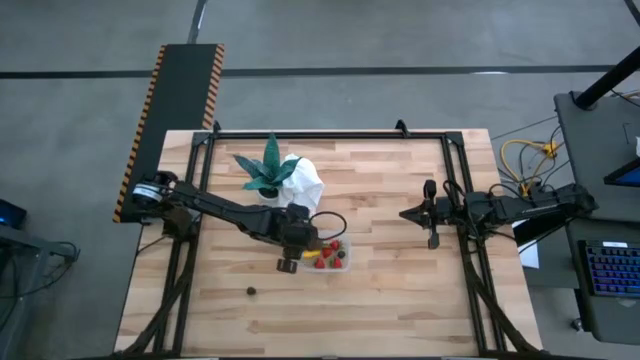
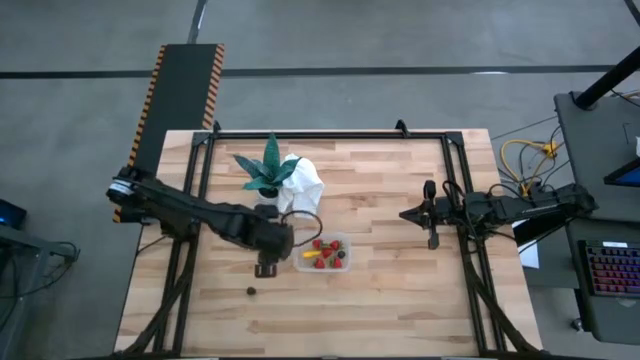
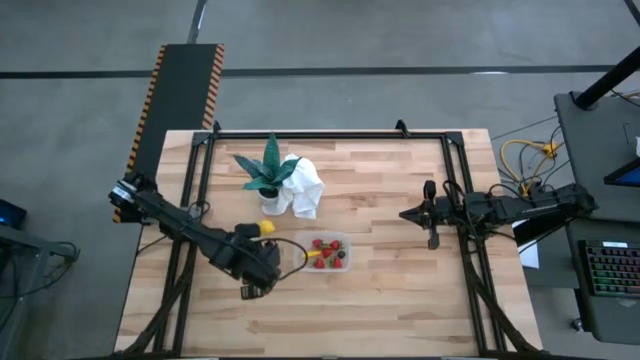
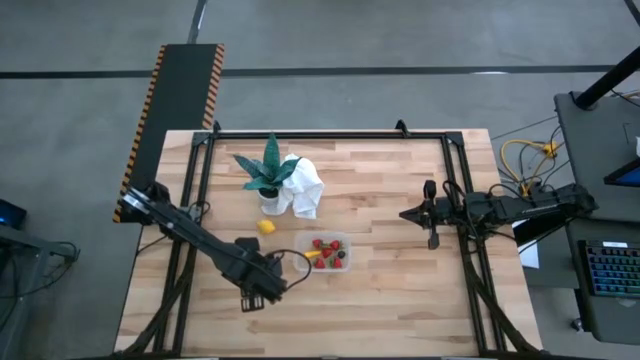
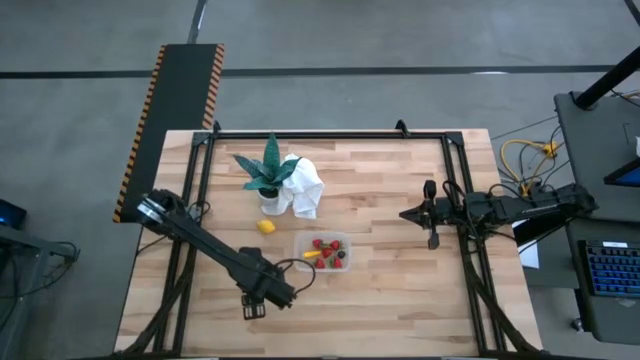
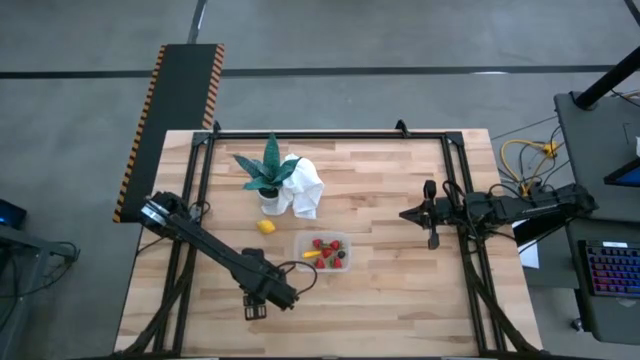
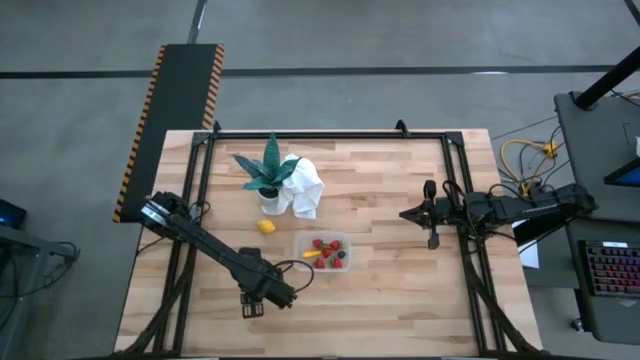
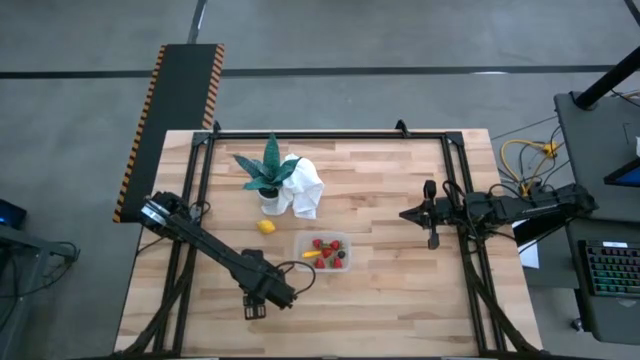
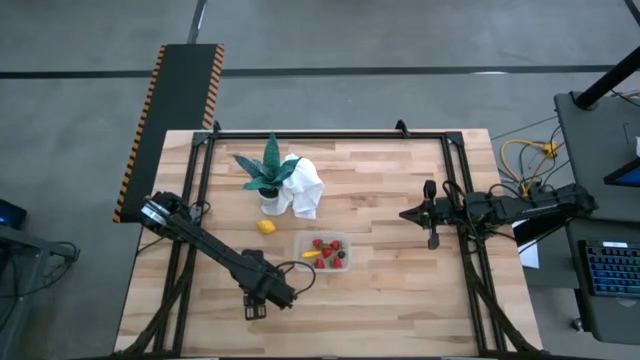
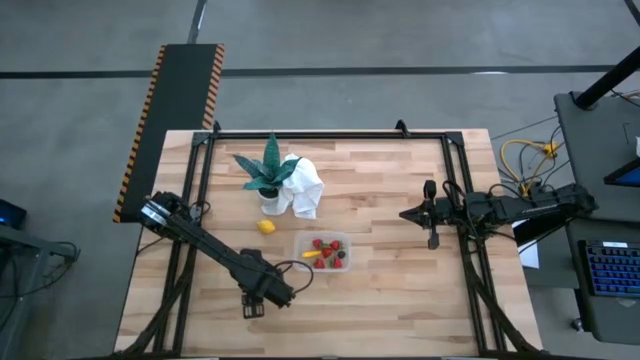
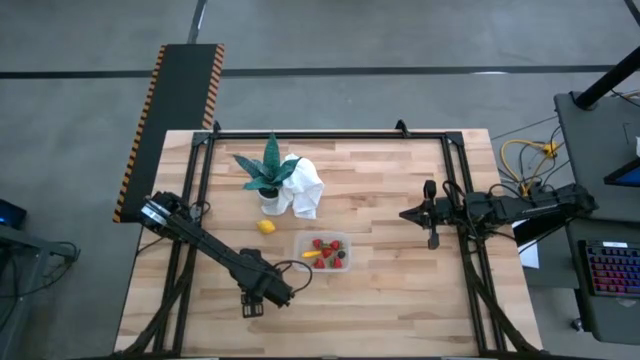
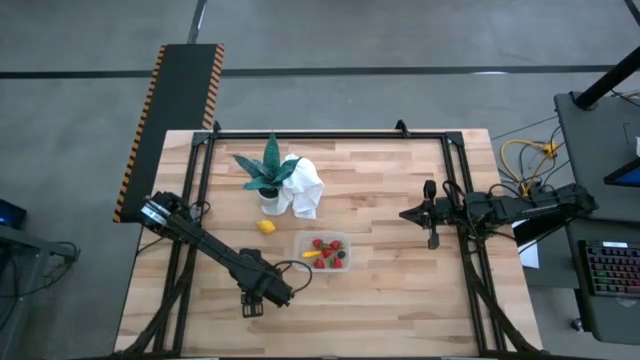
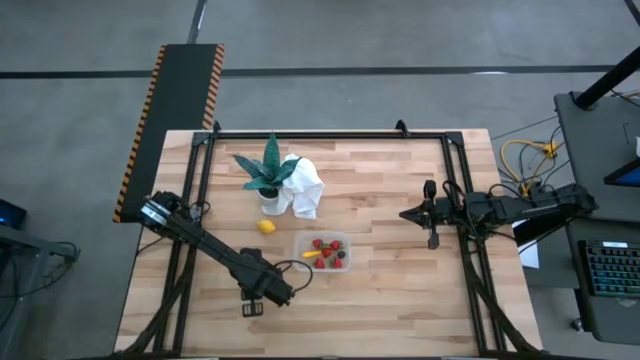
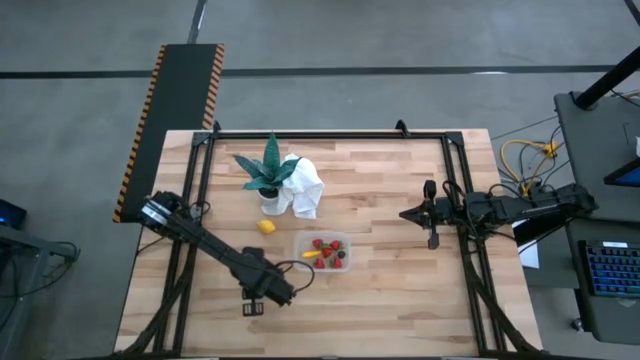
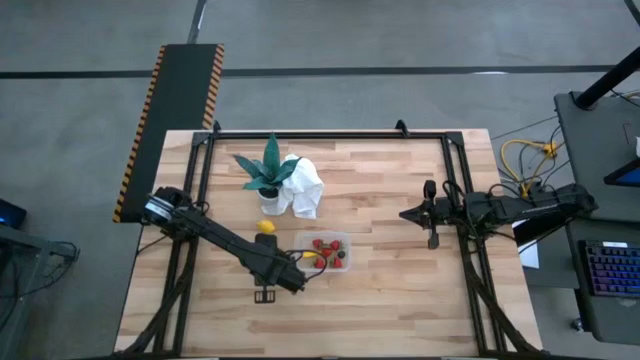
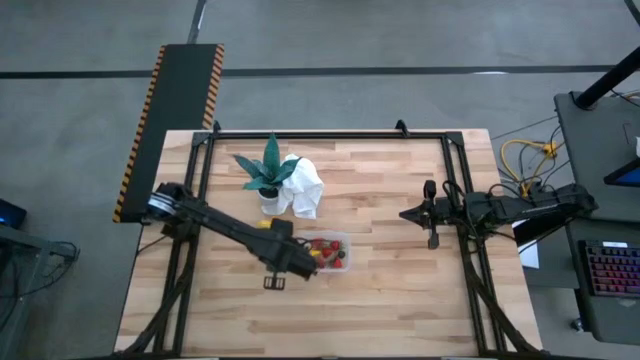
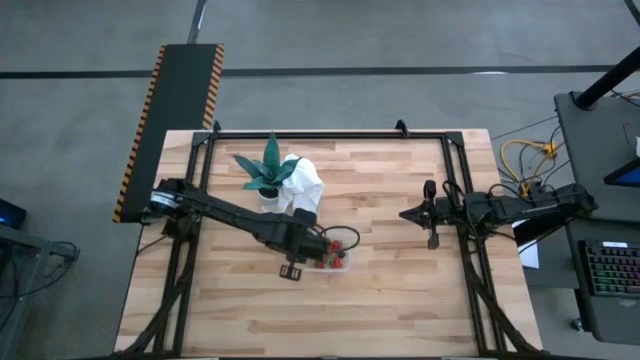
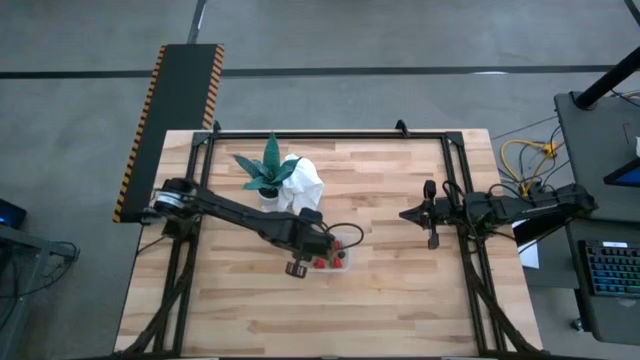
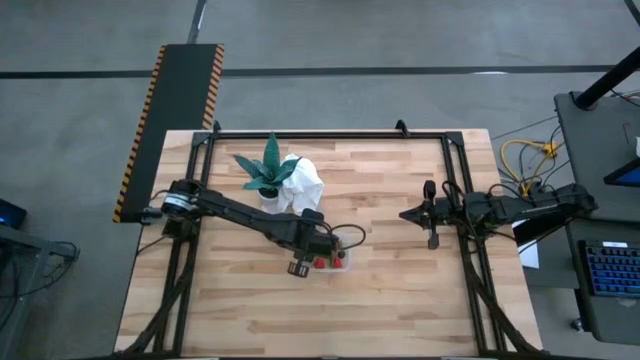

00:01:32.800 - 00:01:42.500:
Task: Pick and placing Produce into tupperware
Put the blackberry into the bin

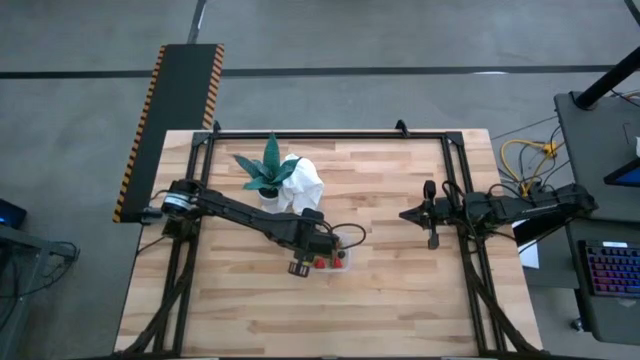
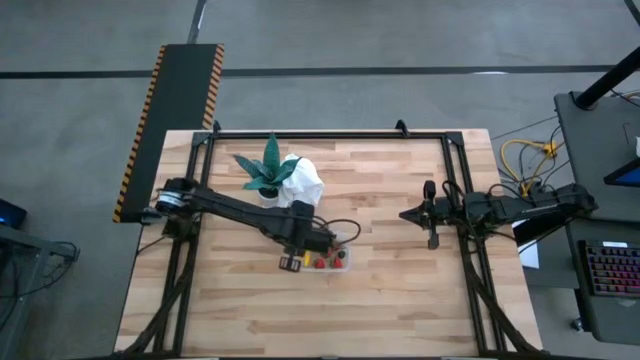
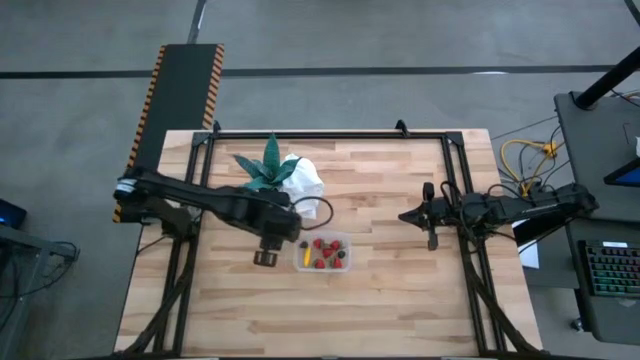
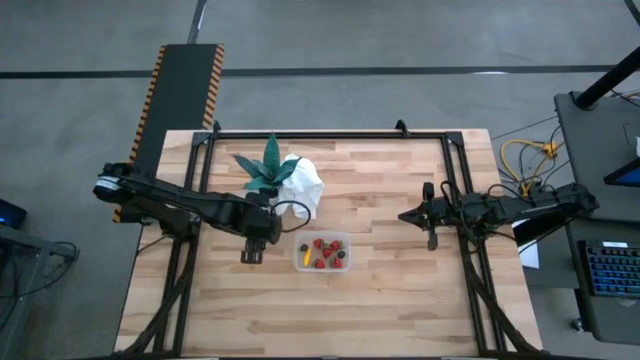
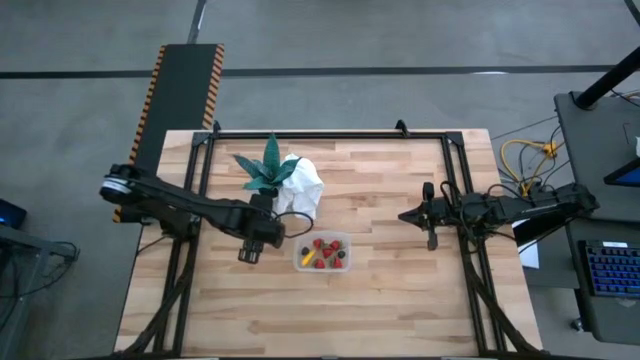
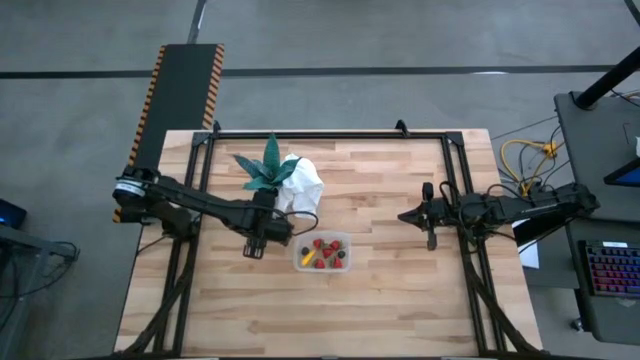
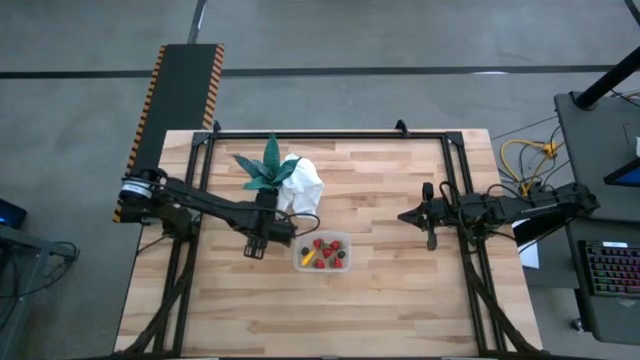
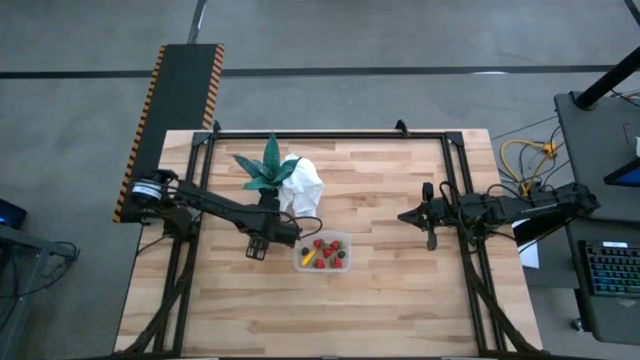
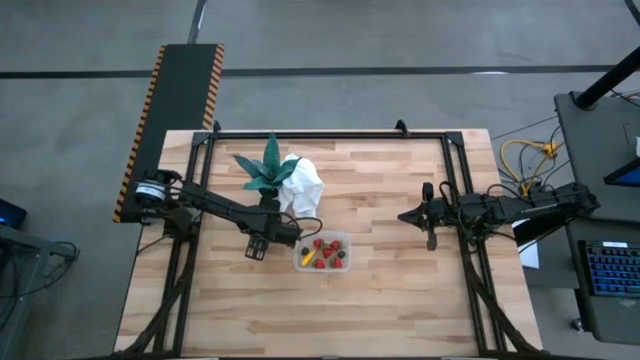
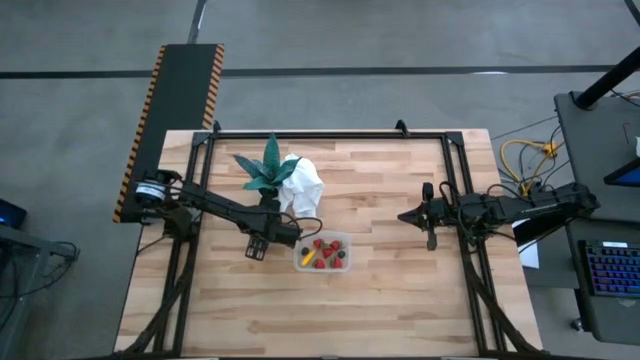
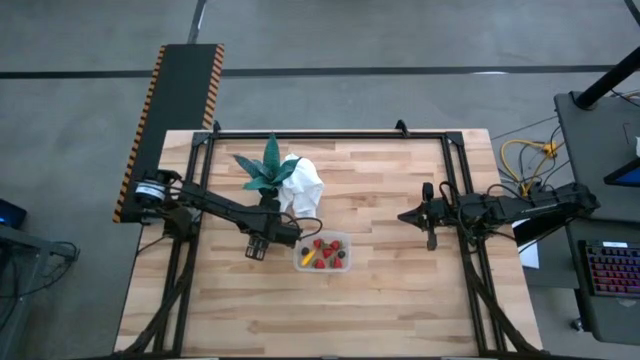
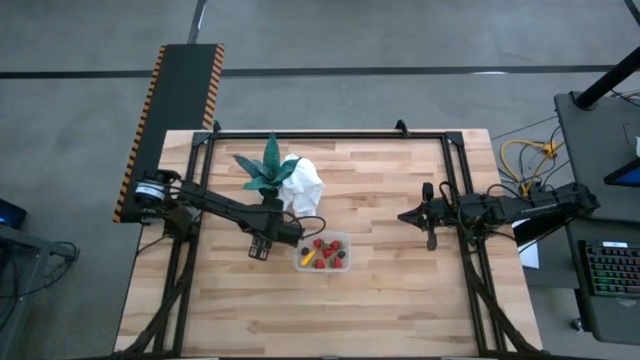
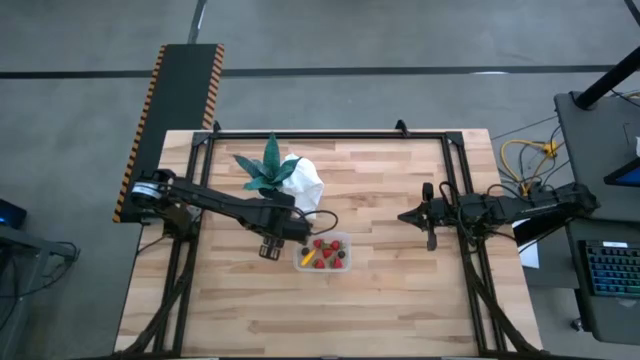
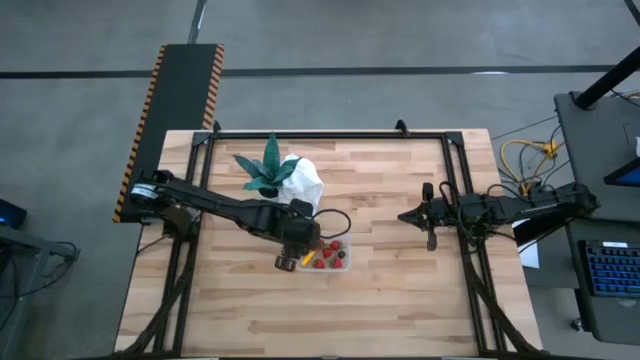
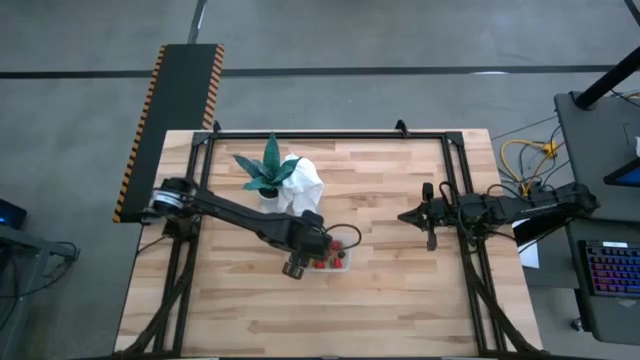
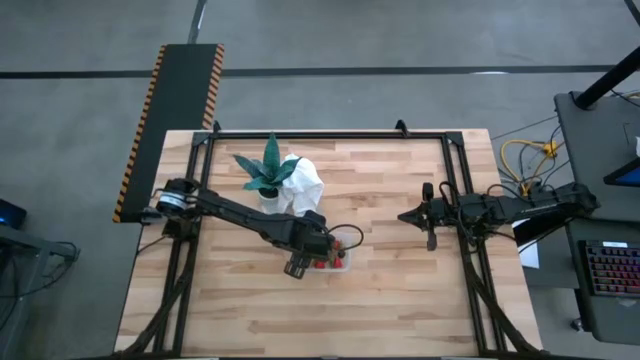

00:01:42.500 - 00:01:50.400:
Put the lemon into the bin

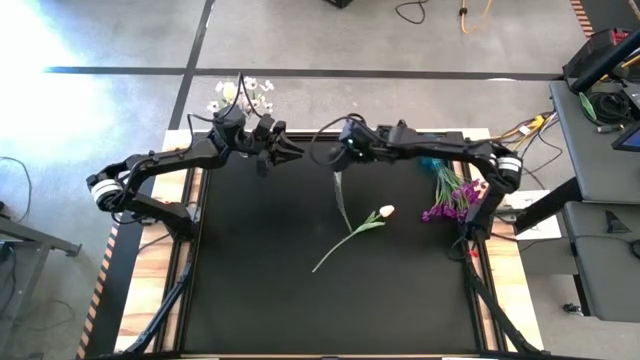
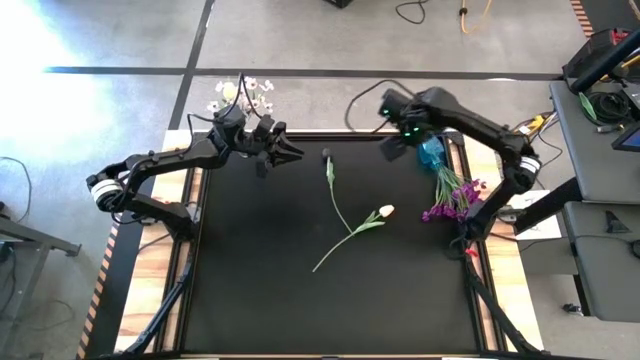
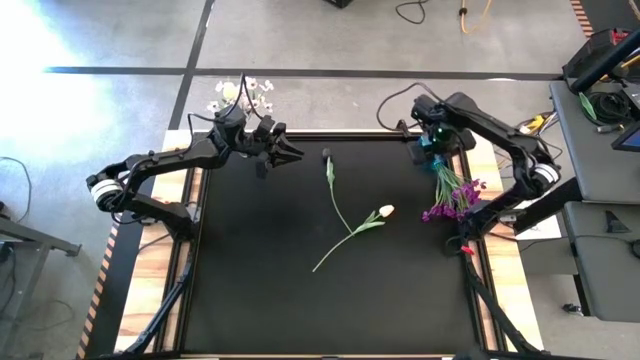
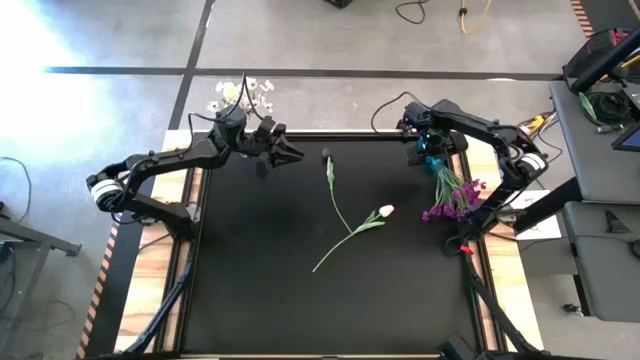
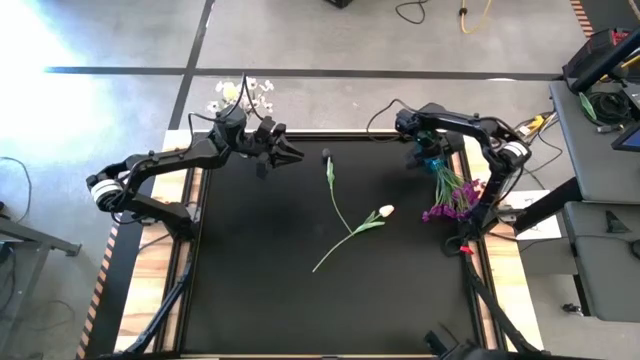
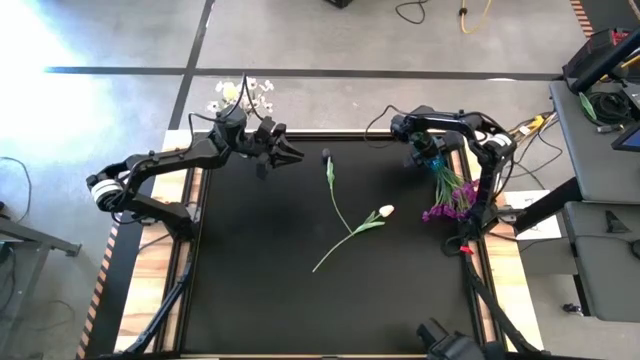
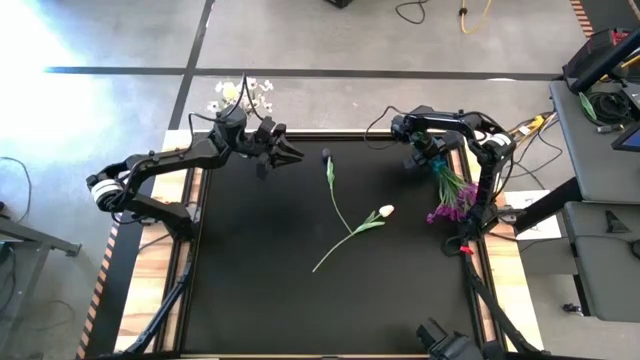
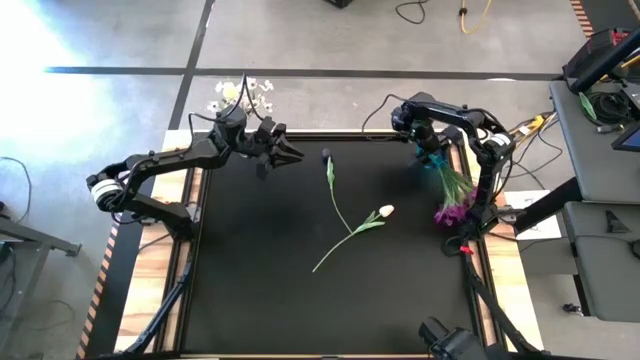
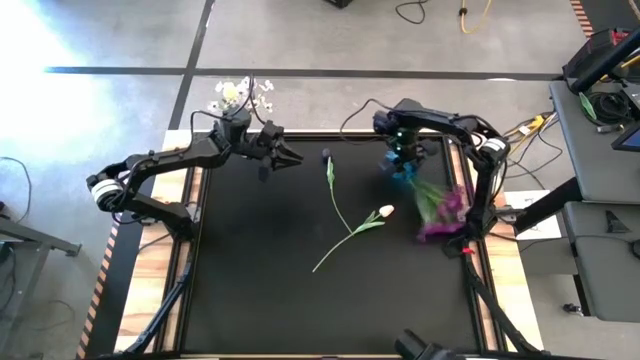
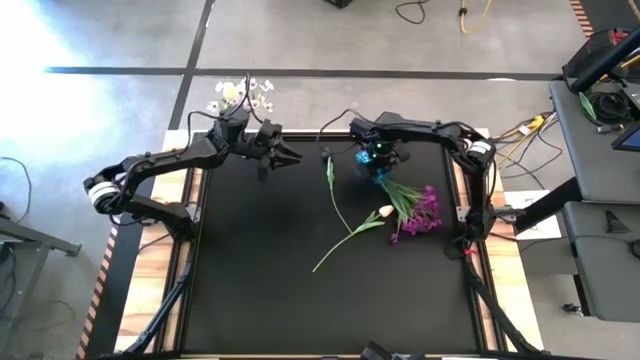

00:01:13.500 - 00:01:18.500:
Task: Sort flowers into vase by color
Move the blue vase to the top center of the table
